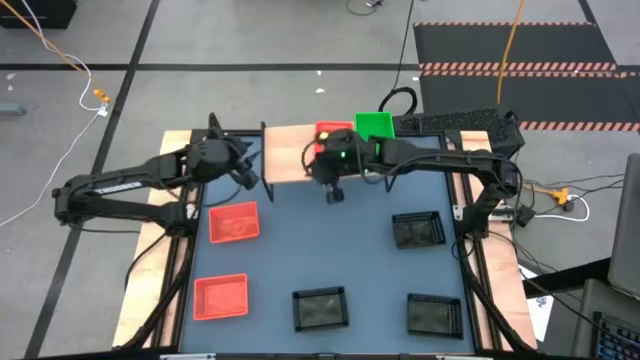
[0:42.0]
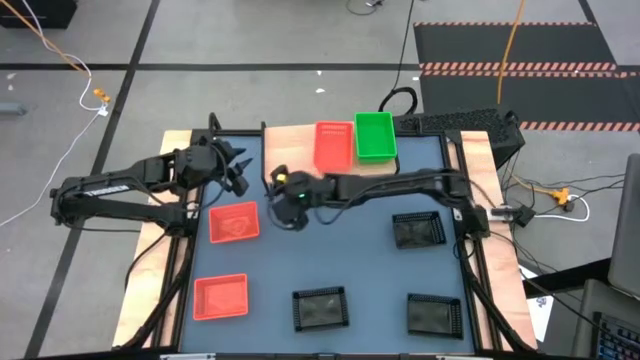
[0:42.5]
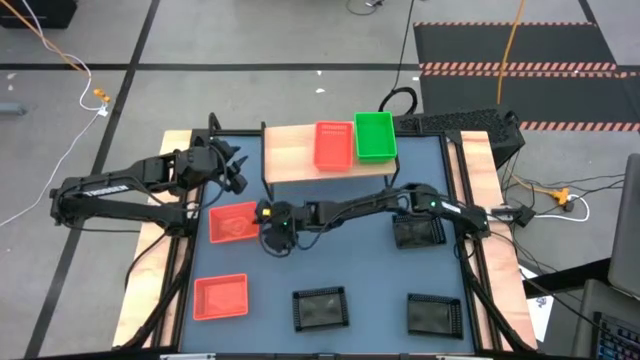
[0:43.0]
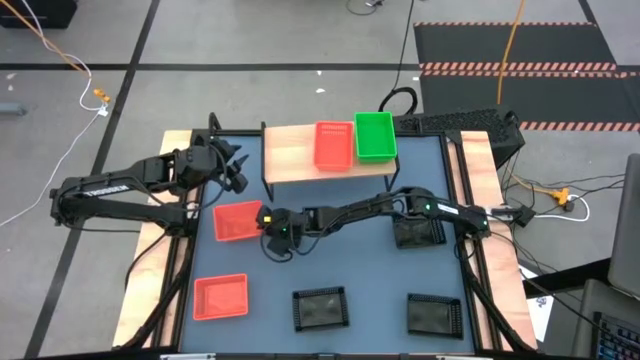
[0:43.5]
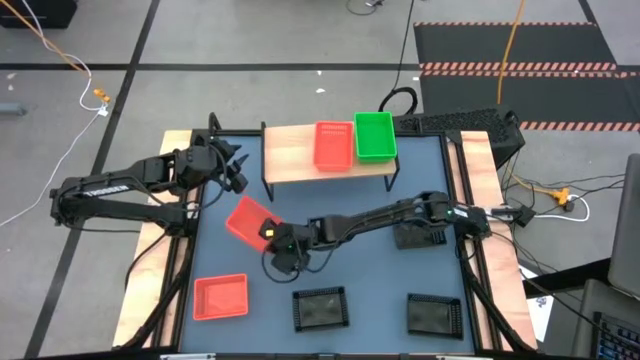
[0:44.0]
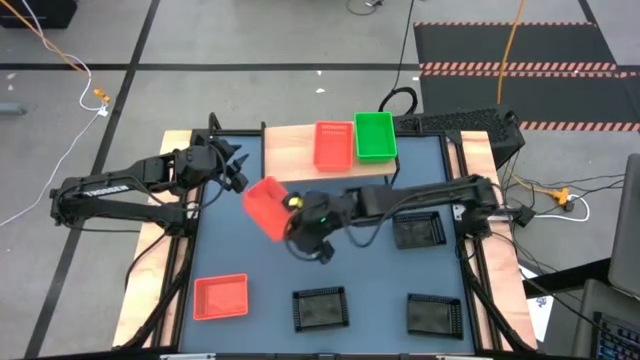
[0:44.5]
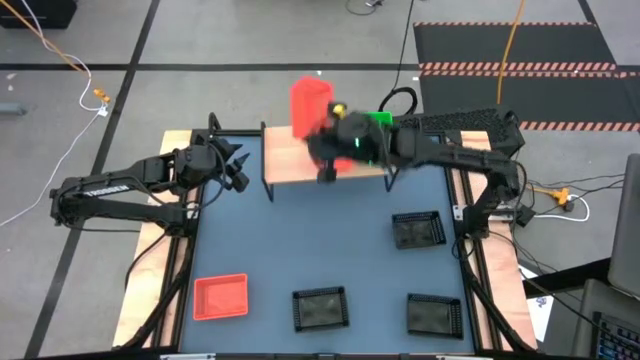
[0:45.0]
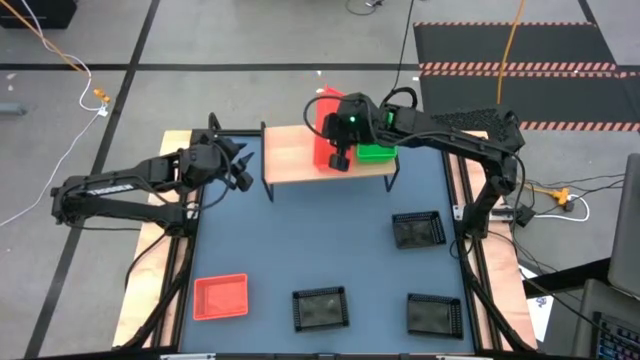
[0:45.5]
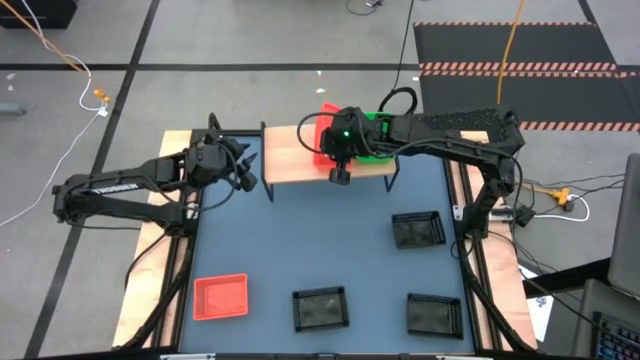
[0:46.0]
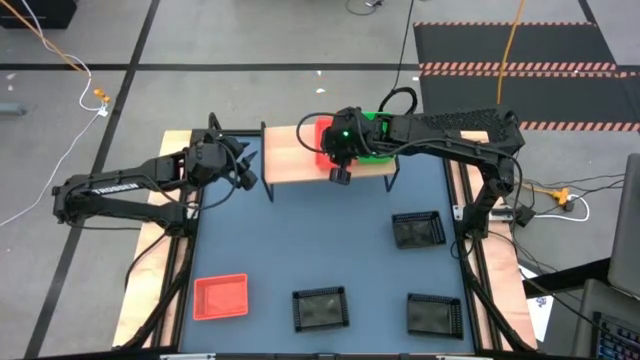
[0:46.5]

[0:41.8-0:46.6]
Task: Stack baskets on shelf by color
Stack the top orange bin on top of the orange bin on the shelf

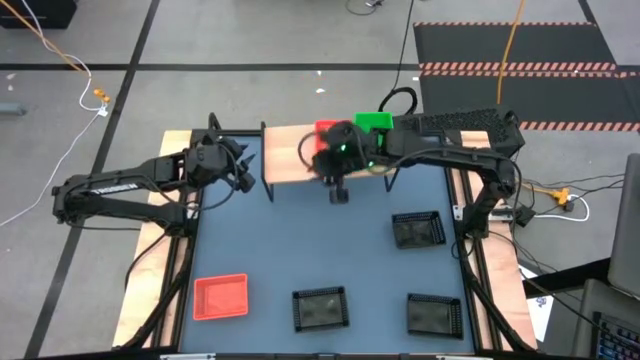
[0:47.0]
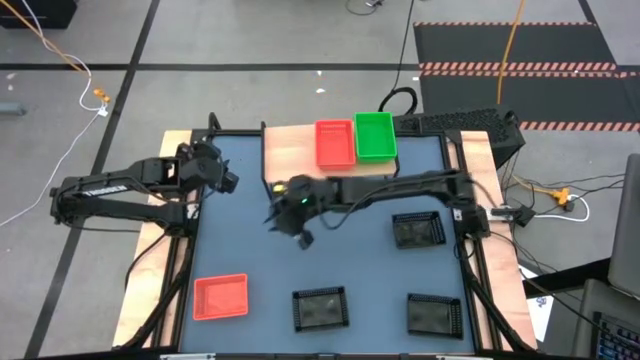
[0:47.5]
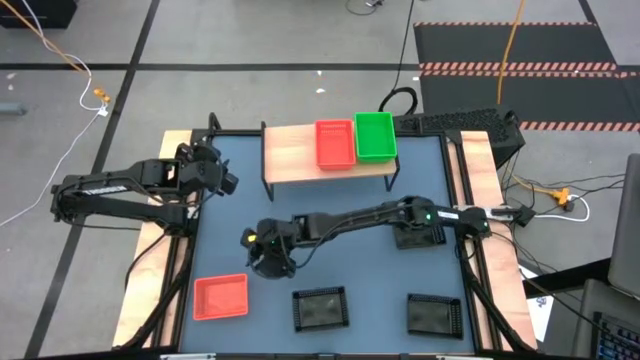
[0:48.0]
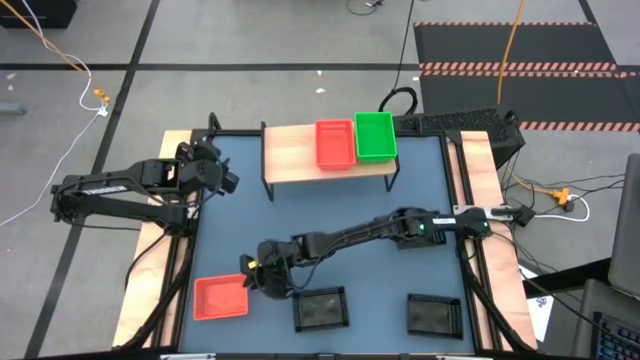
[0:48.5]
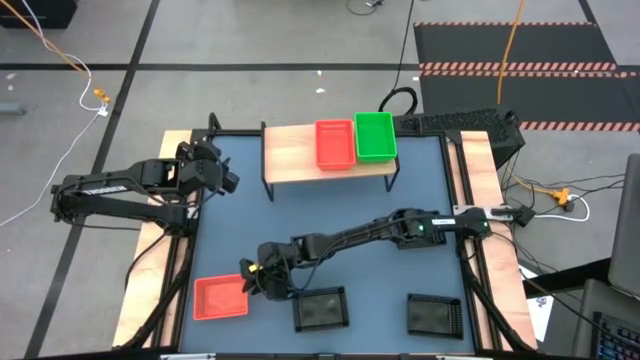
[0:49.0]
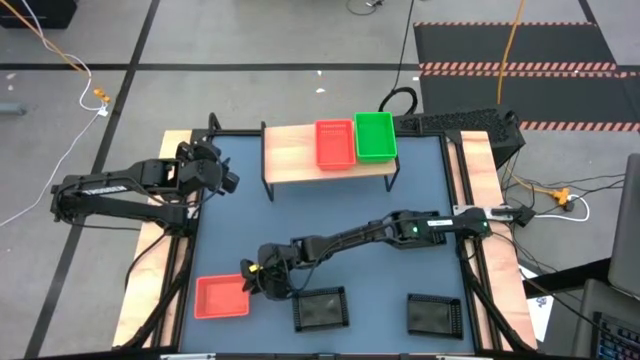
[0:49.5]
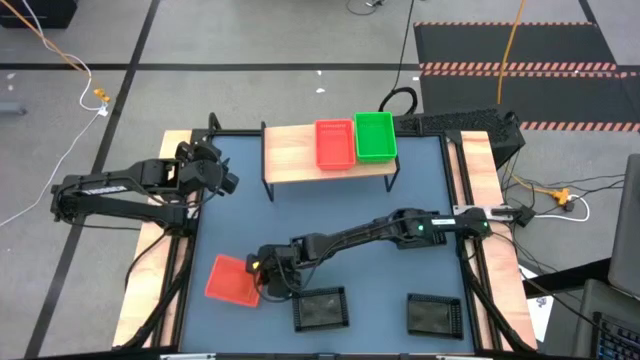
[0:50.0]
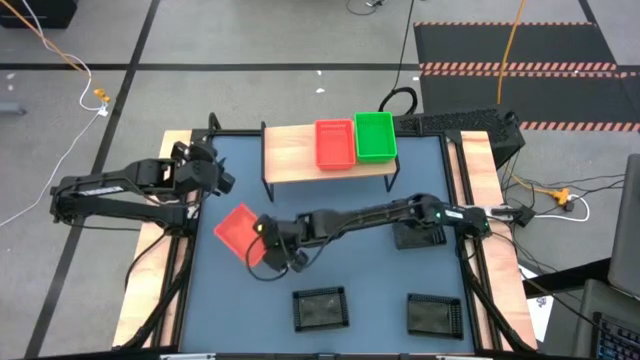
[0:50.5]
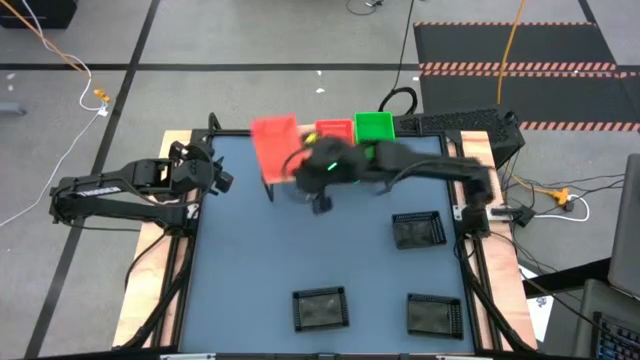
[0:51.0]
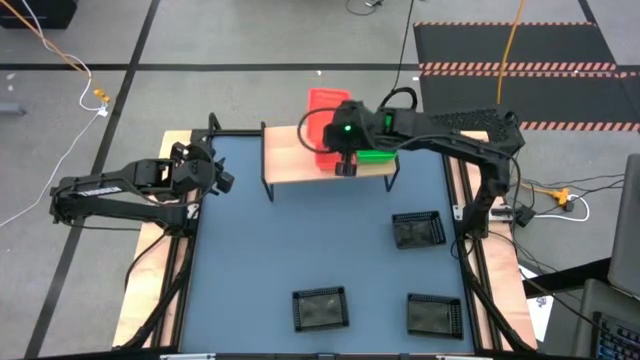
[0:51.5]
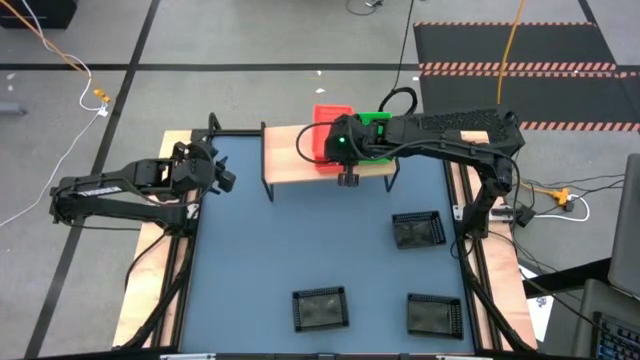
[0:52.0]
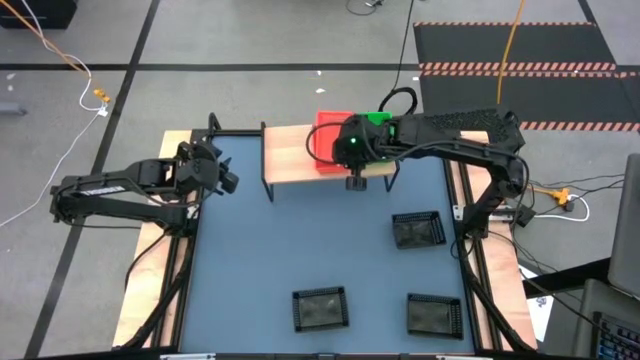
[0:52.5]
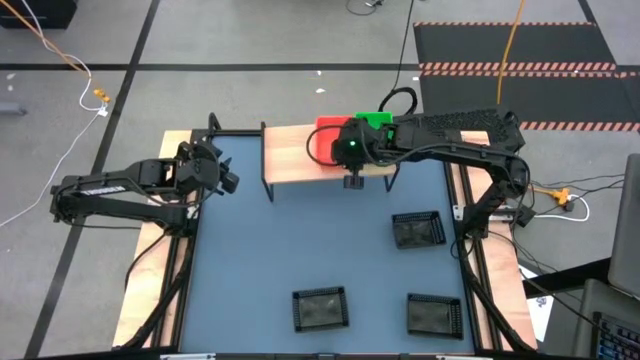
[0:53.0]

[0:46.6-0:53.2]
Stack the orange bin on top of the orange bin on the shelf

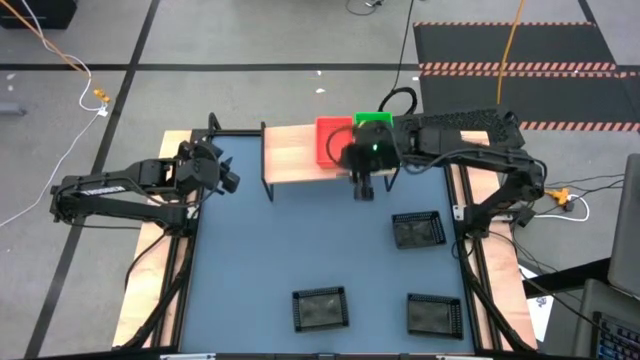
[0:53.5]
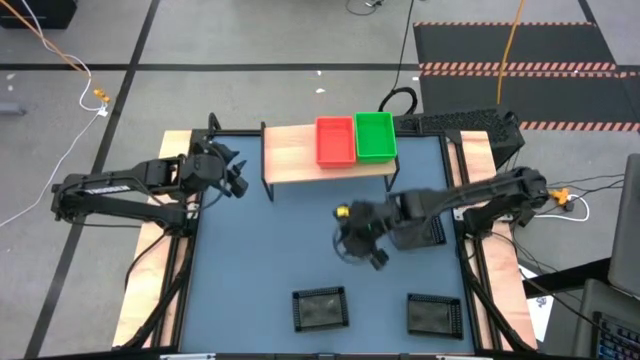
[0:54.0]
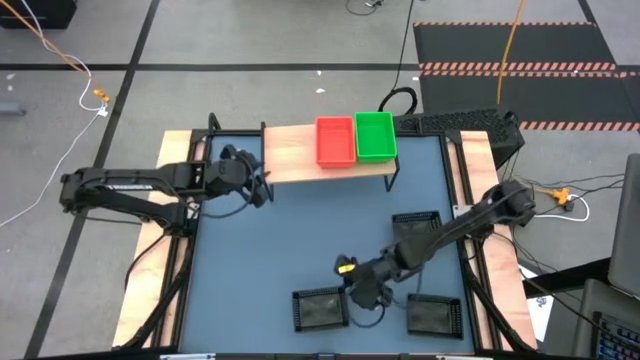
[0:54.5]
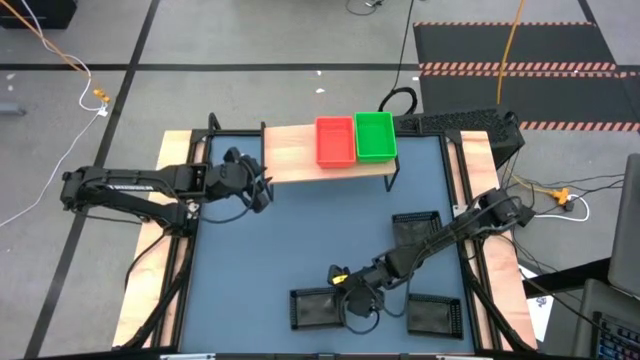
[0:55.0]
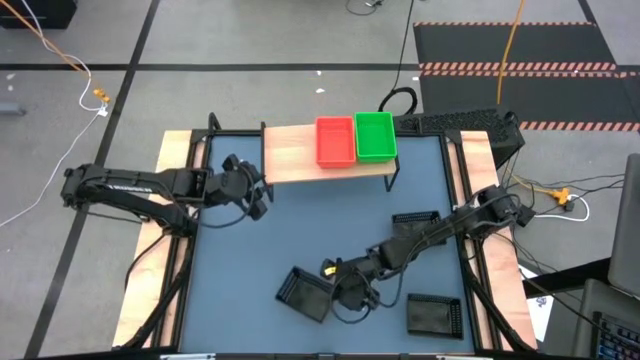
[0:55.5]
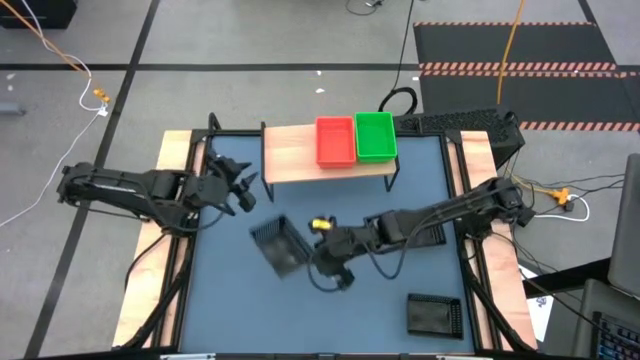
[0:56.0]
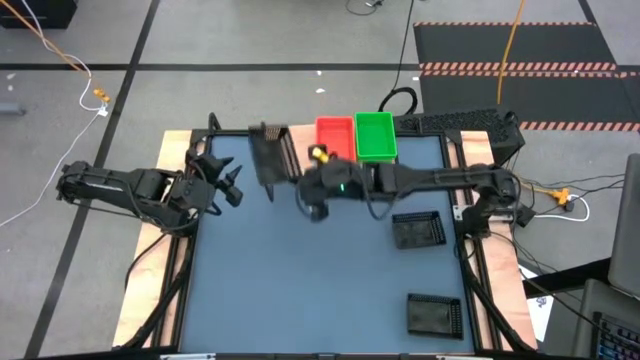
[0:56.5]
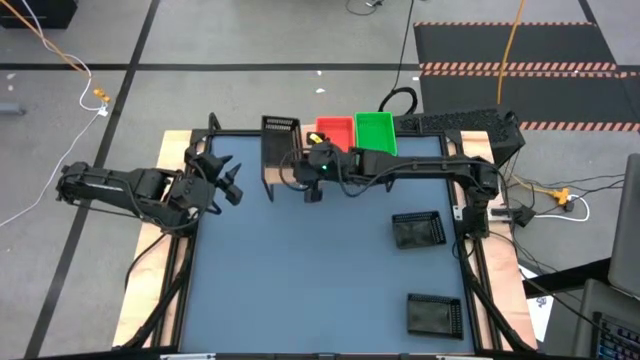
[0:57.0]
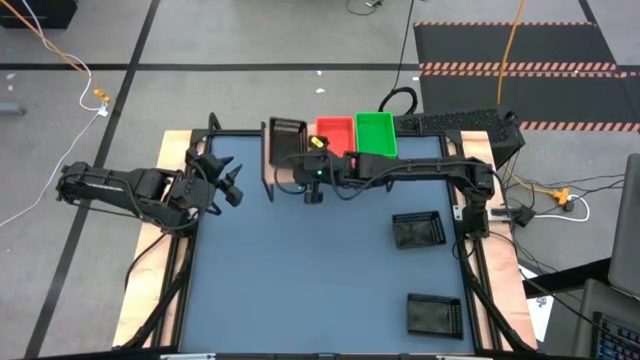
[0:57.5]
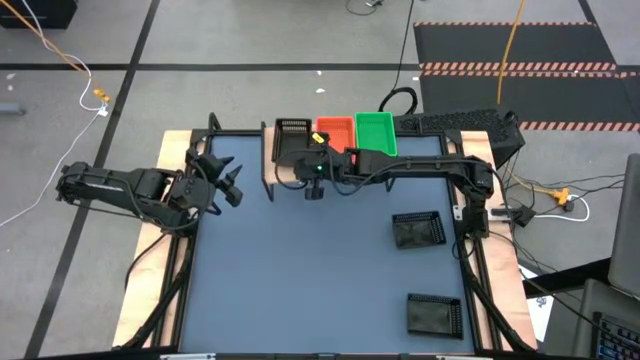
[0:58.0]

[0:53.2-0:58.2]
Put the bottom left black bin on the shelf

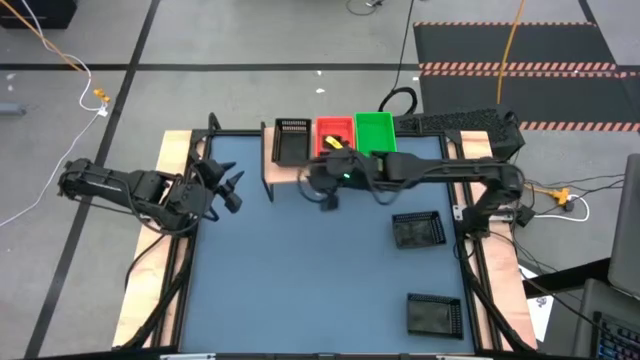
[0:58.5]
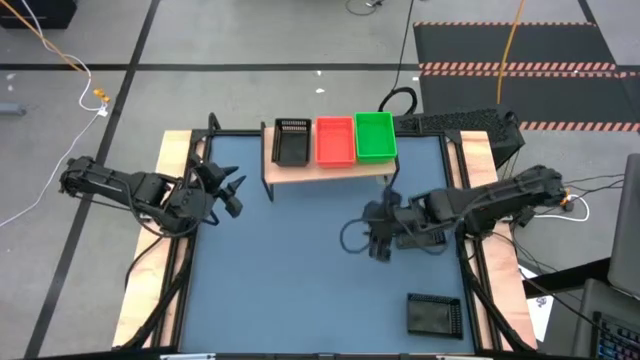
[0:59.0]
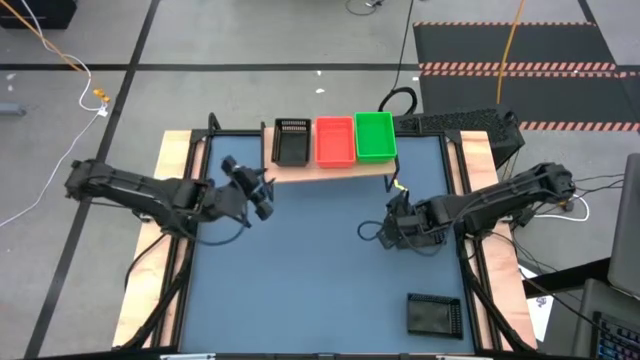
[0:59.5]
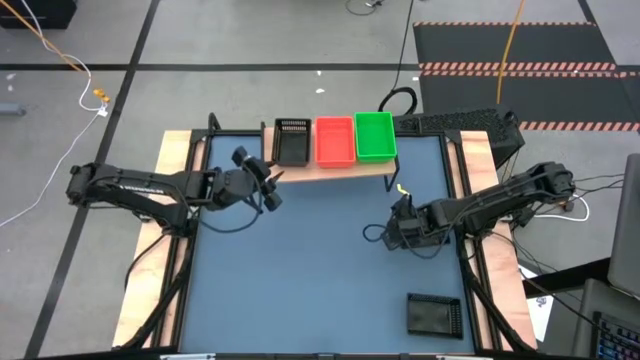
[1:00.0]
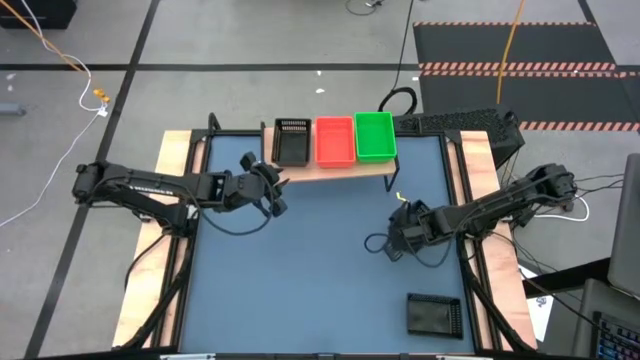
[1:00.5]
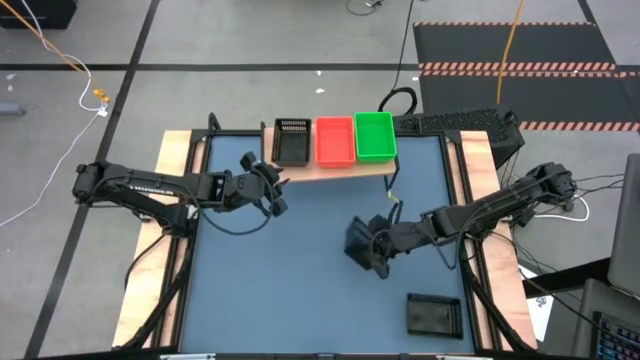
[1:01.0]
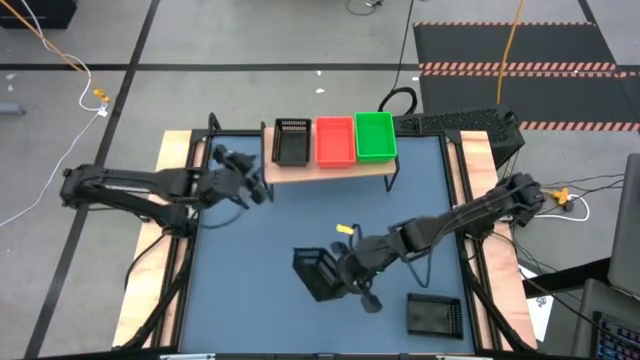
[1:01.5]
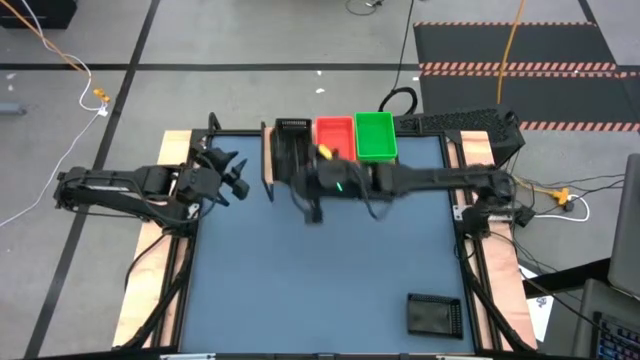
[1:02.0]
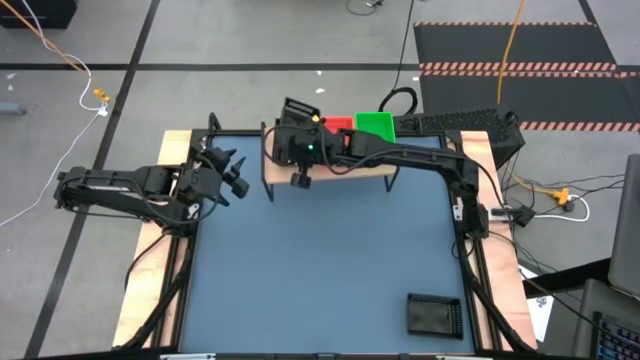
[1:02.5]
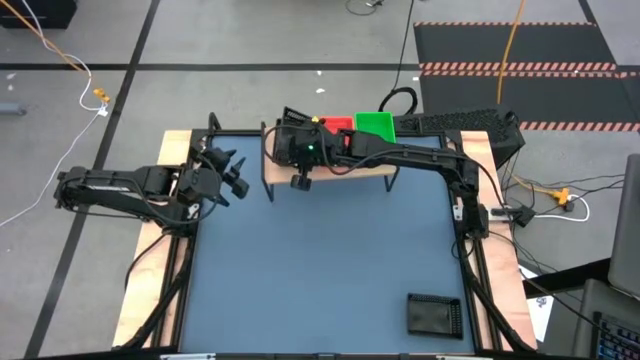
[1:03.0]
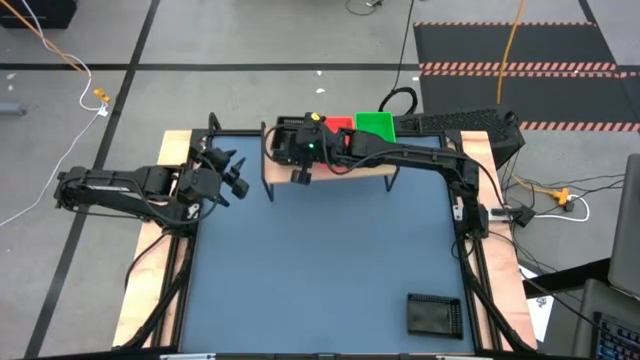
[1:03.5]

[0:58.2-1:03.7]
Stack the top black bin on top of the black bin on the shelf
